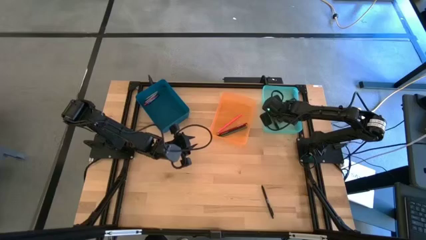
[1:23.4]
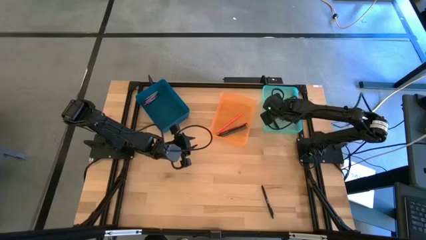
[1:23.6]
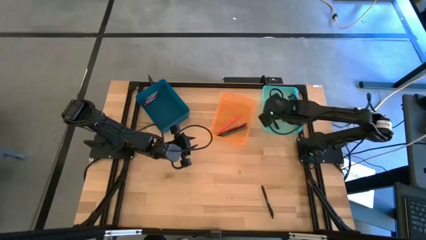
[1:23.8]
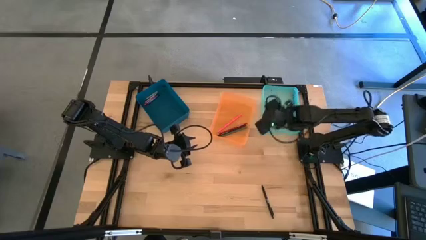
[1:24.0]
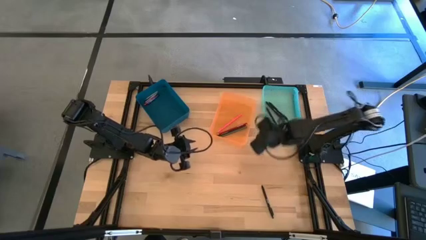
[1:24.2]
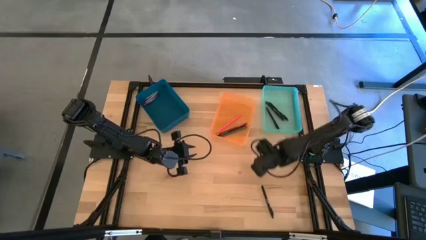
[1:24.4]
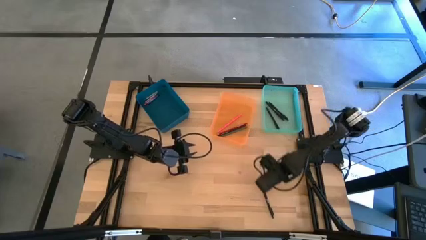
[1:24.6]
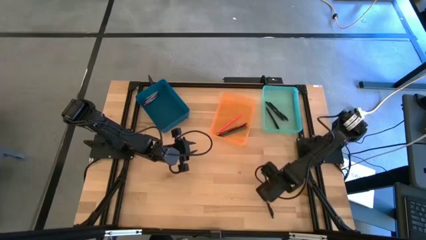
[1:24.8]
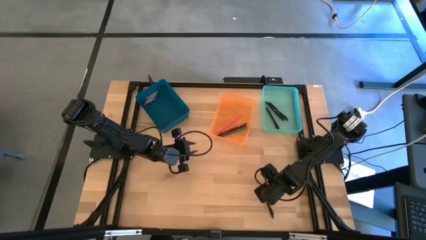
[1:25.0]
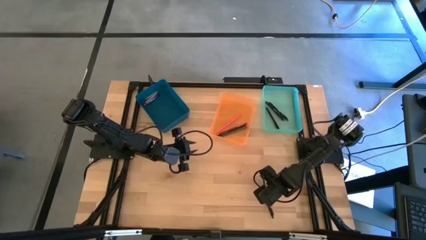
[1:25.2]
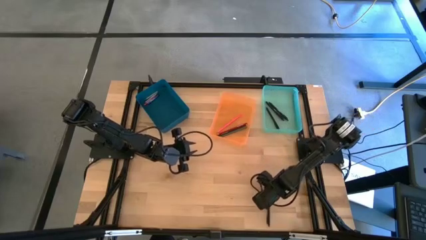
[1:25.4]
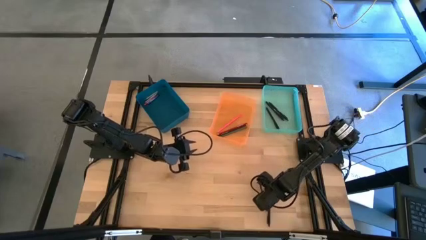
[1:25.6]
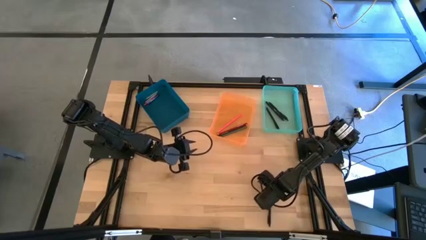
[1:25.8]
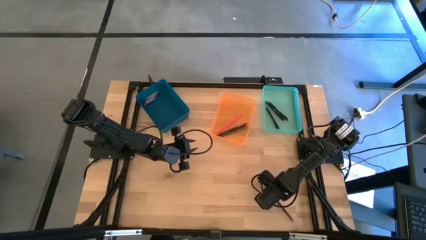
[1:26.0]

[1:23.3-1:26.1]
Task: Sort crayons/erasers/pens/pencils in bins
Put the black pen into the light blue bin

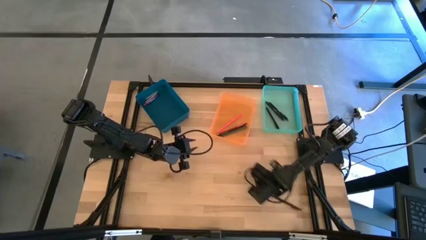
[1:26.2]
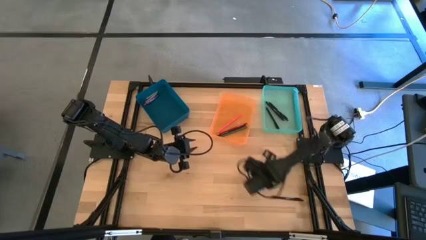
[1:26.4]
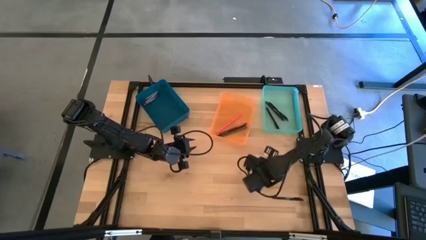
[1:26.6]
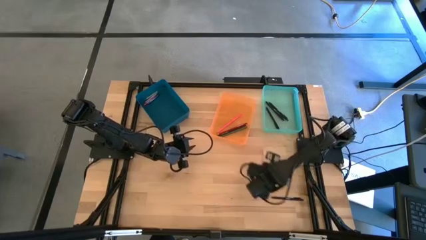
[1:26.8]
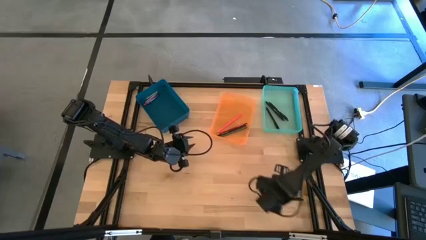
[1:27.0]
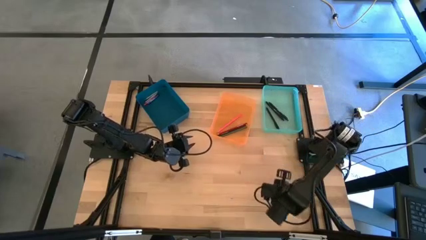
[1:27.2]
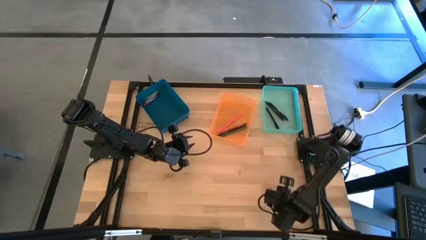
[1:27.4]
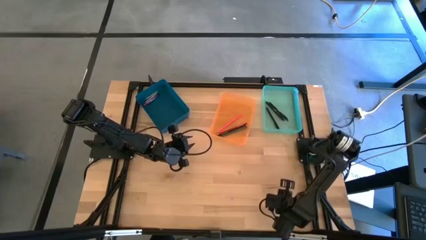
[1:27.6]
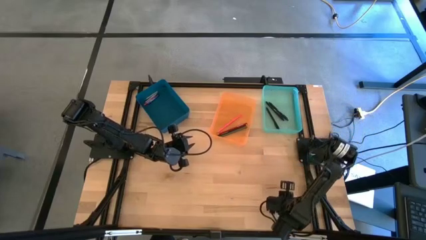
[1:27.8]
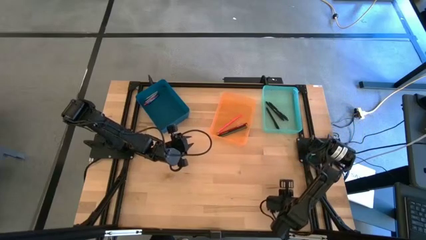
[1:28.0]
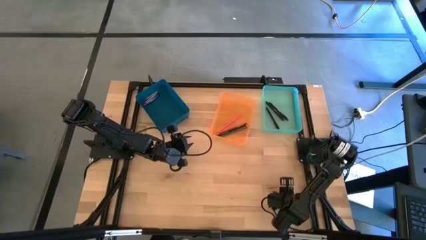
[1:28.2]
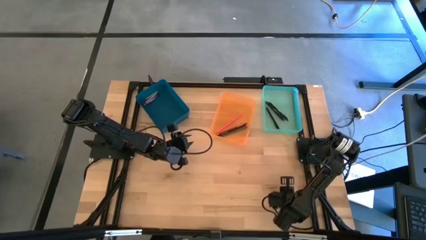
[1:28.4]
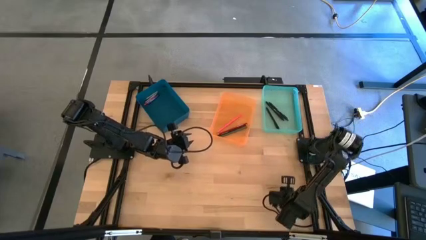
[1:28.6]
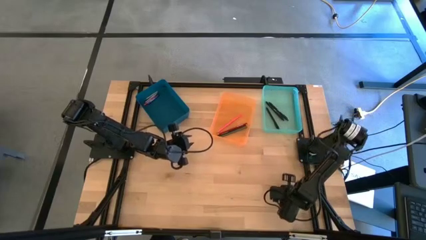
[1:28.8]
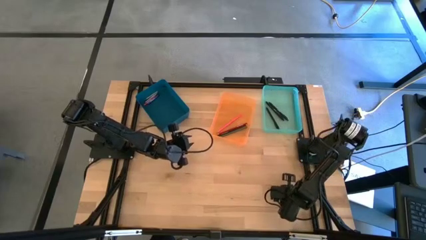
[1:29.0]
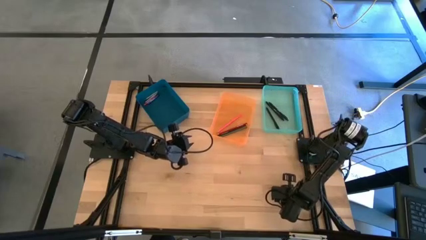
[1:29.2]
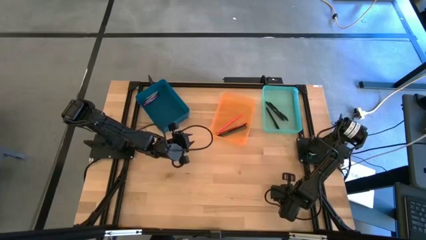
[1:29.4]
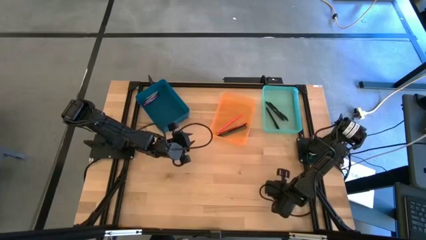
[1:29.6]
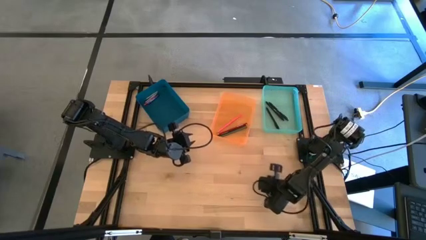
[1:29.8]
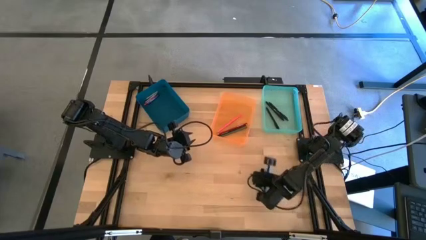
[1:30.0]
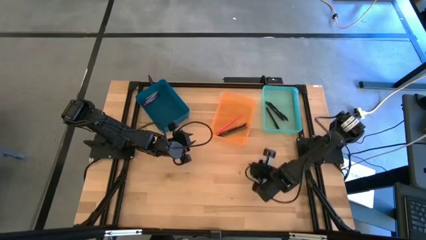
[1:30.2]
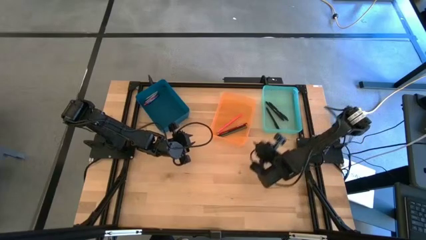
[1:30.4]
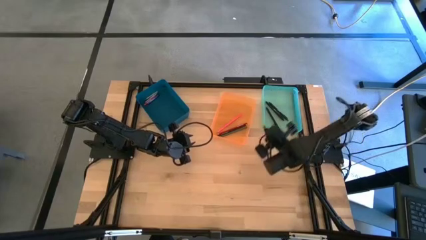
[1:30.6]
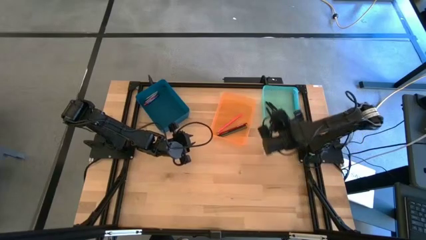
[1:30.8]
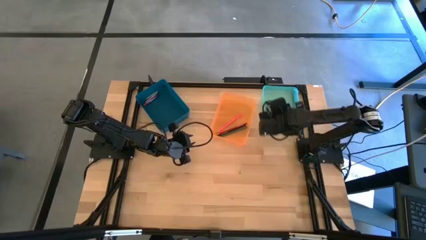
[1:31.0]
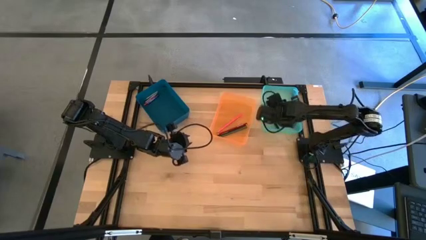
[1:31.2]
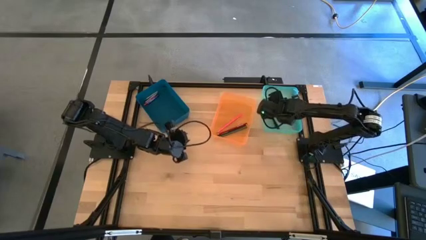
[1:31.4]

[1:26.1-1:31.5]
Put the black pen into the light blue bin

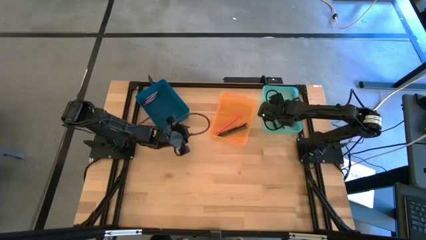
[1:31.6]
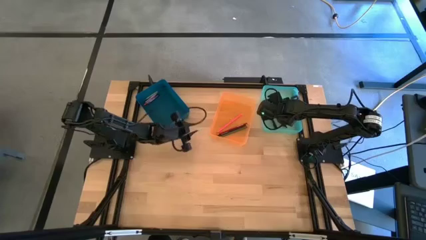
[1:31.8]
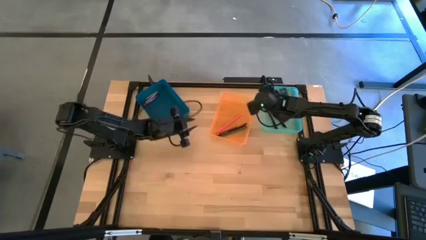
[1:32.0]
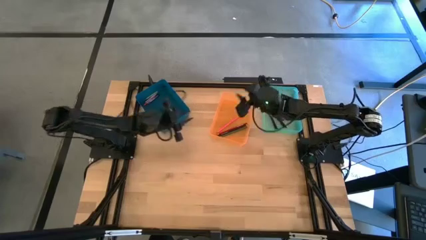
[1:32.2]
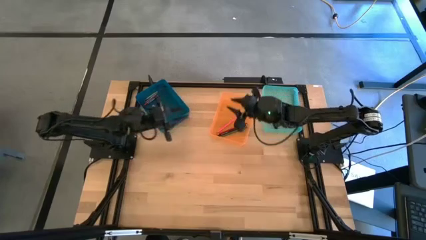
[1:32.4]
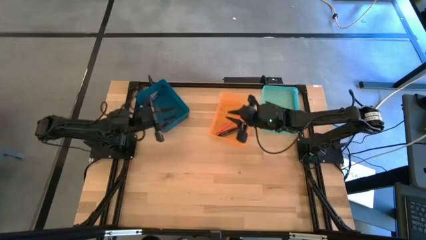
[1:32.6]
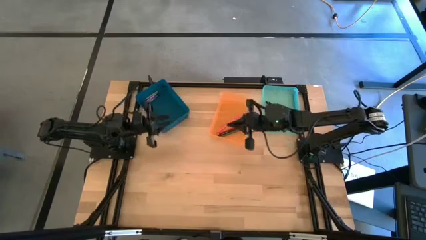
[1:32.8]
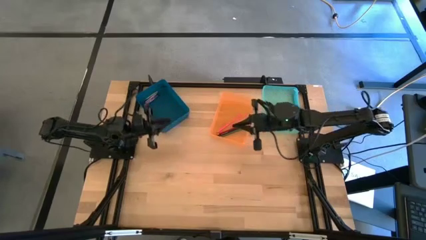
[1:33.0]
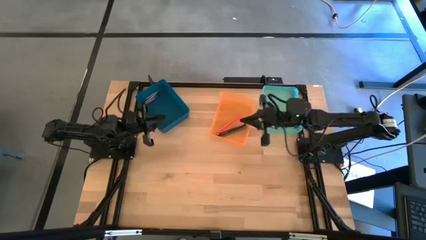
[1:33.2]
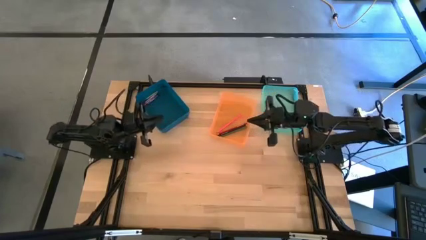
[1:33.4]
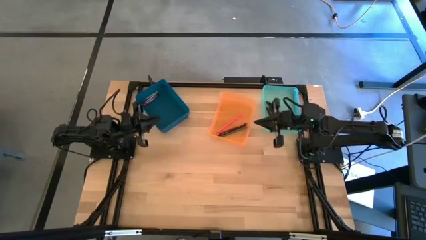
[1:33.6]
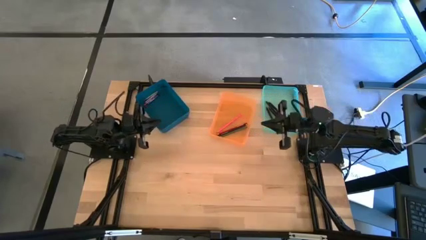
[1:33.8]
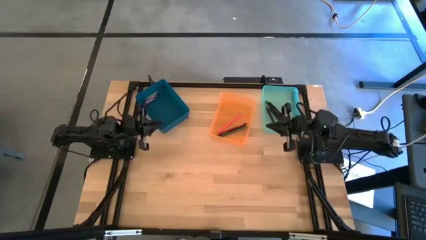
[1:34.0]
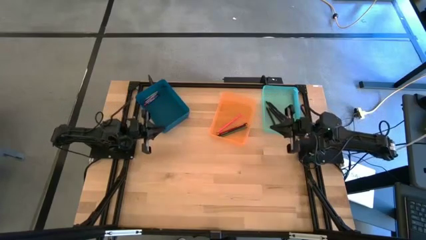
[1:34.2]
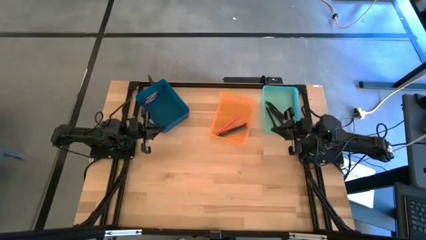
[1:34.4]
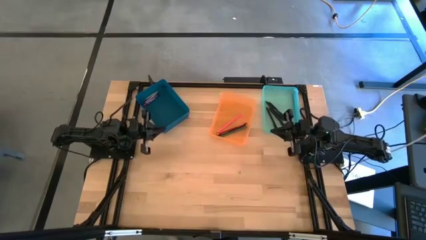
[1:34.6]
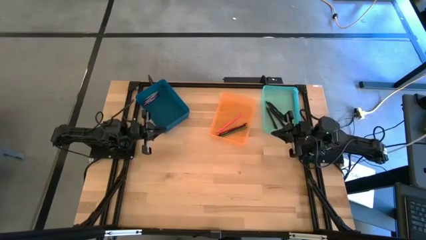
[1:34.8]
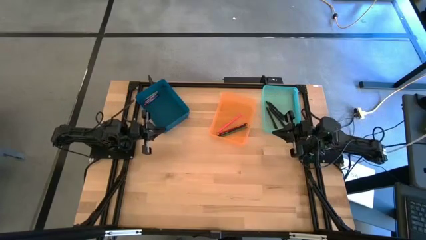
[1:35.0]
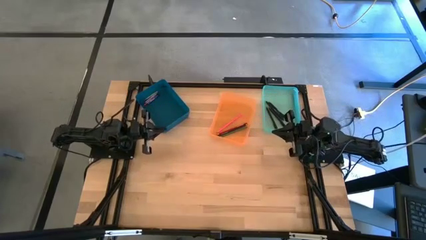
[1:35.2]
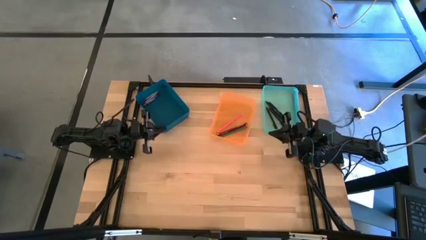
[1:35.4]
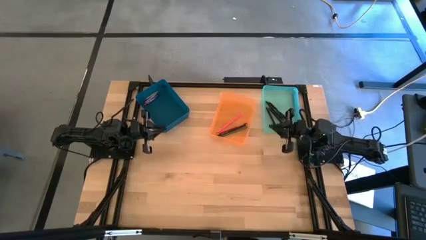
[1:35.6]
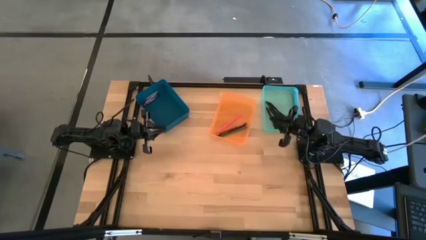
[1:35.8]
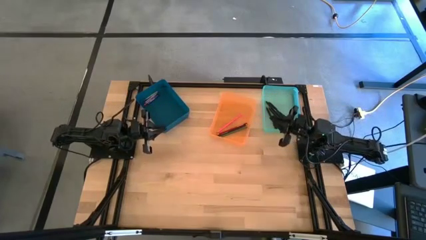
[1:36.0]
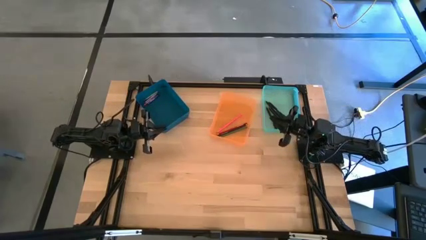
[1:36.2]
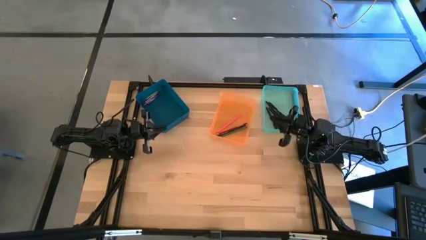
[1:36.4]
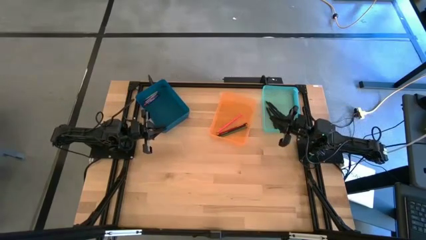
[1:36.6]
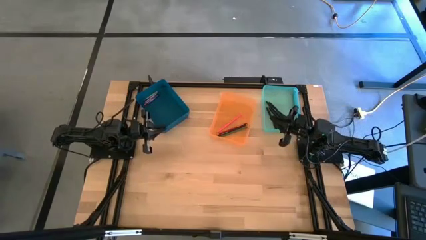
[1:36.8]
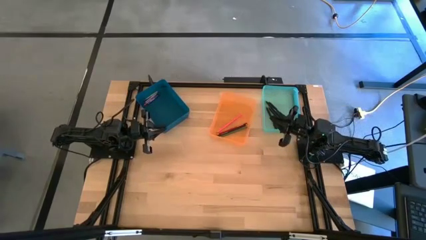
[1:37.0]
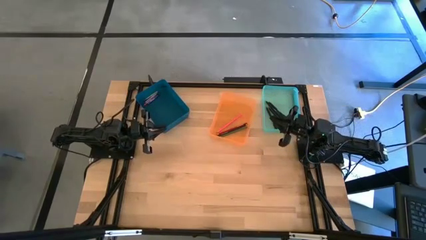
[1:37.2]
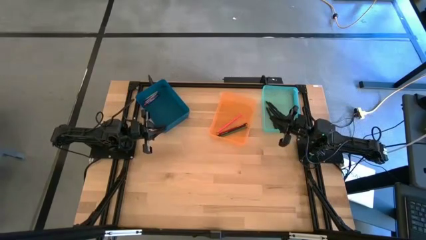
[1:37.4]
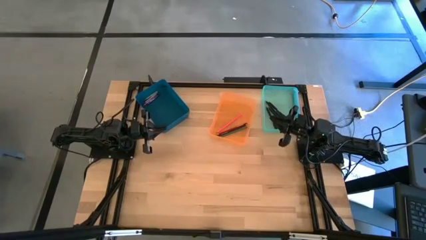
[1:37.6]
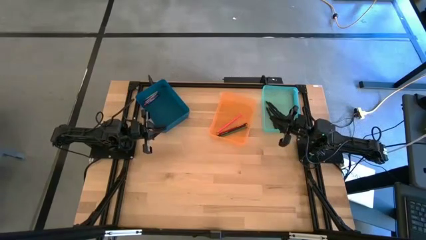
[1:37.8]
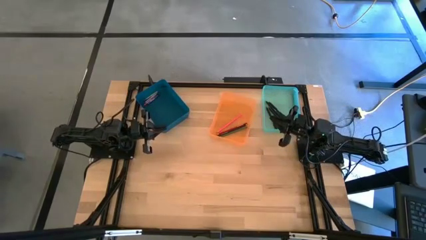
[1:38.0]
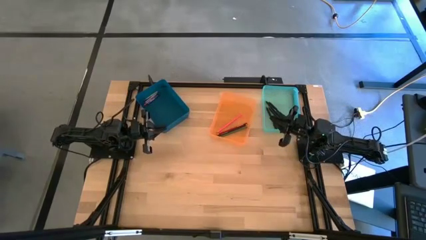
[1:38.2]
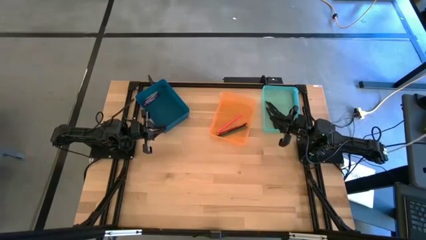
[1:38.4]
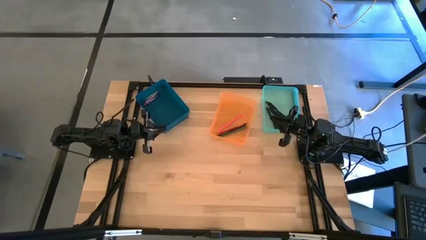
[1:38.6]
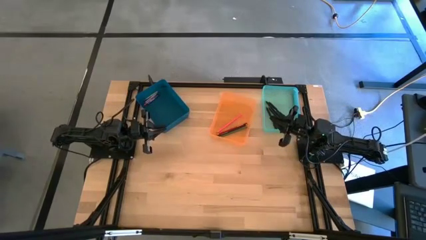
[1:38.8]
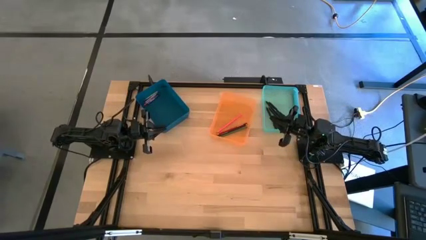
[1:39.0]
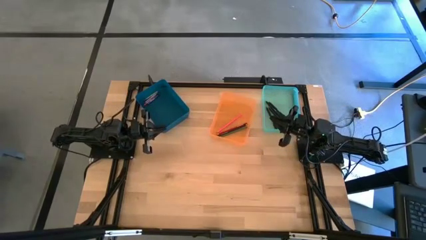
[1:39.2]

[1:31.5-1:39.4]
Return to Home Position
